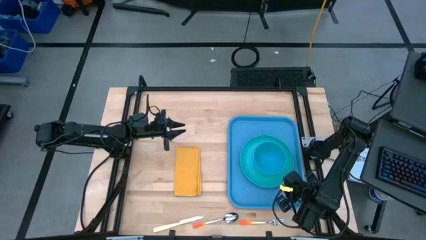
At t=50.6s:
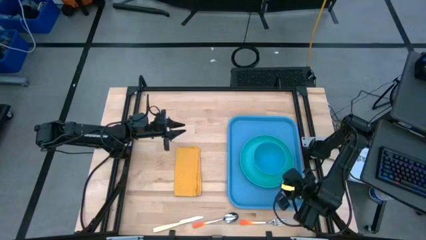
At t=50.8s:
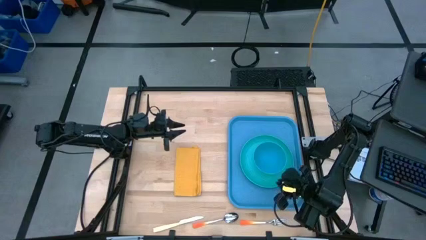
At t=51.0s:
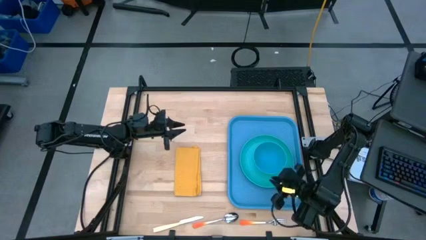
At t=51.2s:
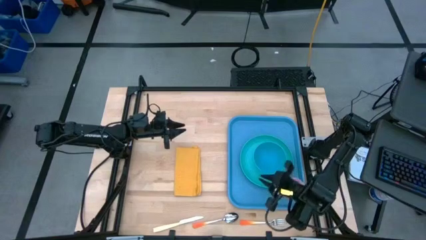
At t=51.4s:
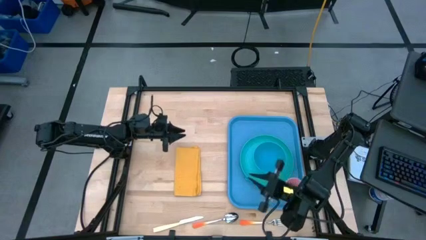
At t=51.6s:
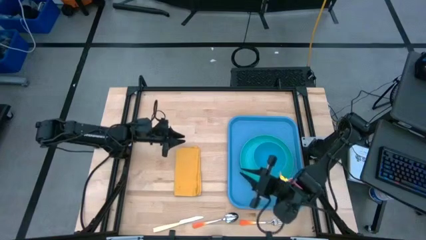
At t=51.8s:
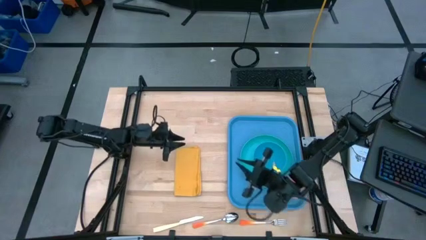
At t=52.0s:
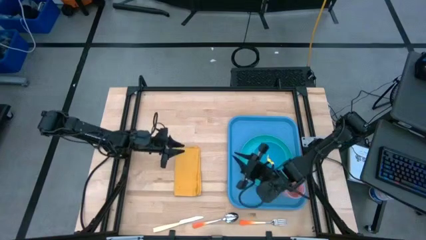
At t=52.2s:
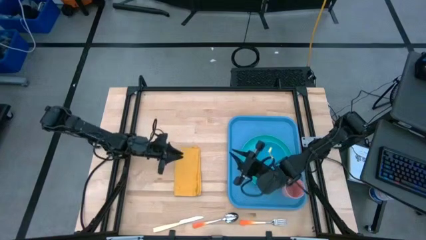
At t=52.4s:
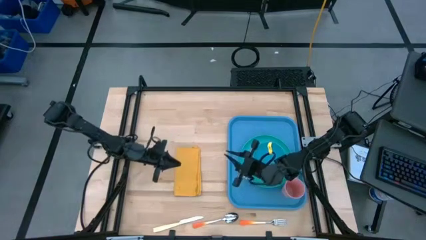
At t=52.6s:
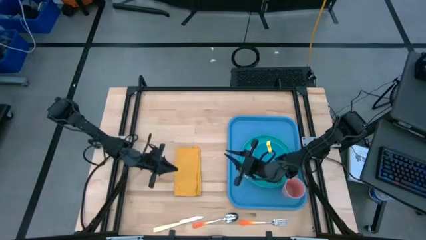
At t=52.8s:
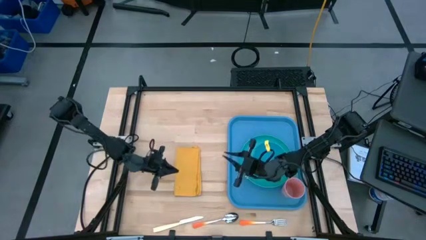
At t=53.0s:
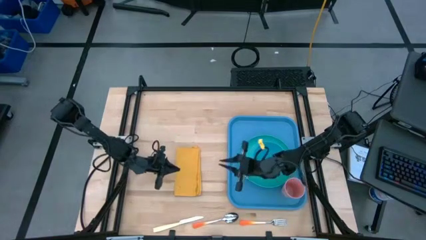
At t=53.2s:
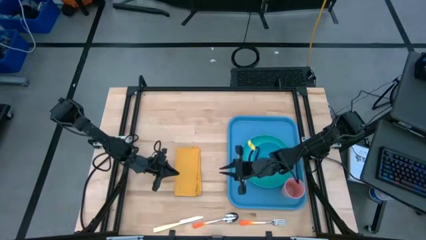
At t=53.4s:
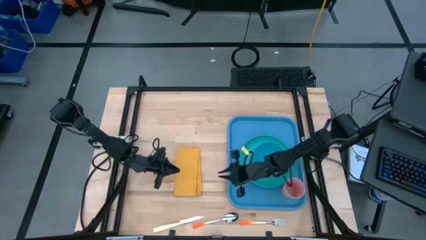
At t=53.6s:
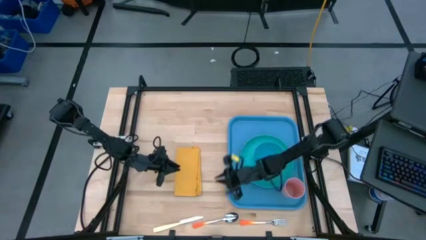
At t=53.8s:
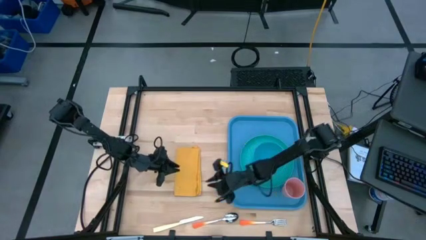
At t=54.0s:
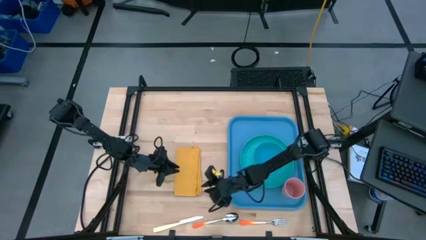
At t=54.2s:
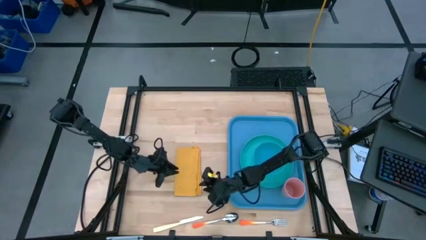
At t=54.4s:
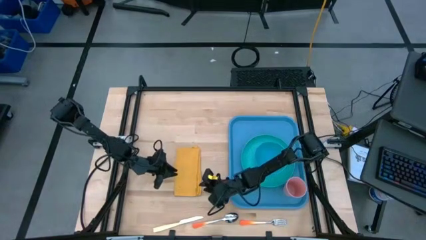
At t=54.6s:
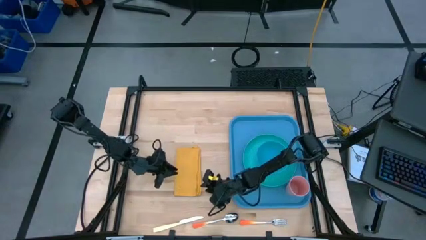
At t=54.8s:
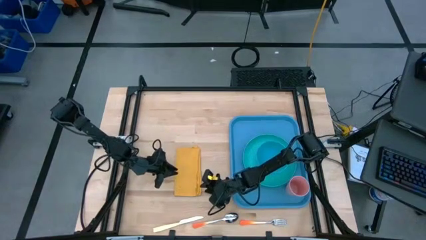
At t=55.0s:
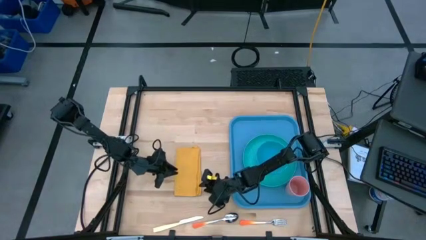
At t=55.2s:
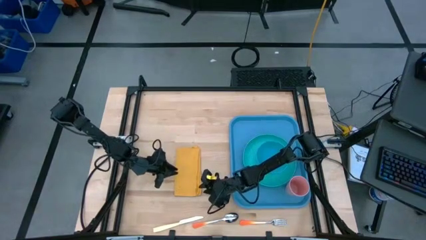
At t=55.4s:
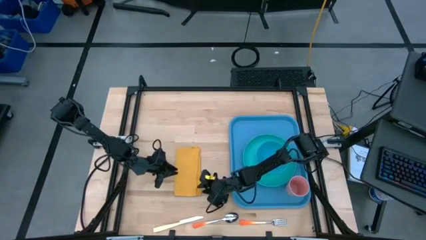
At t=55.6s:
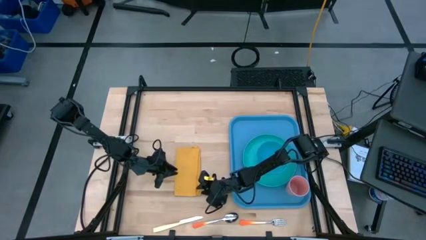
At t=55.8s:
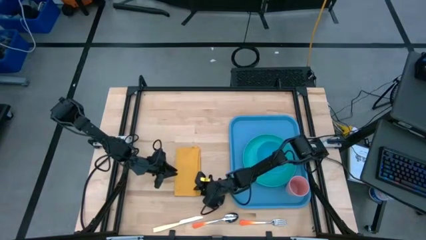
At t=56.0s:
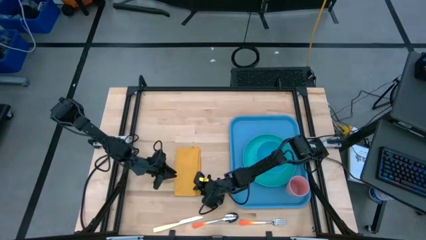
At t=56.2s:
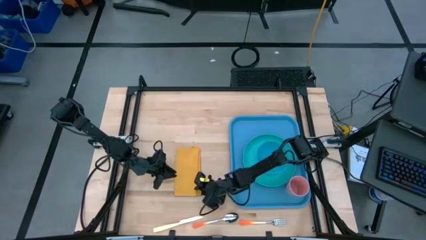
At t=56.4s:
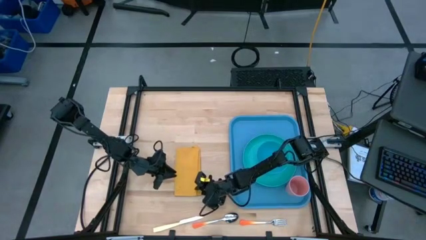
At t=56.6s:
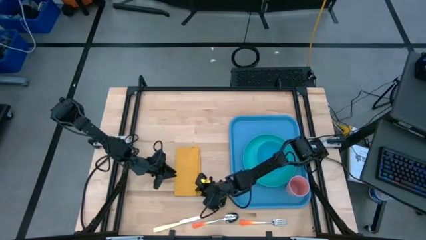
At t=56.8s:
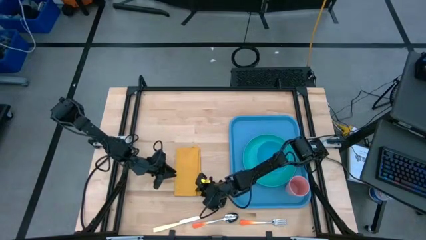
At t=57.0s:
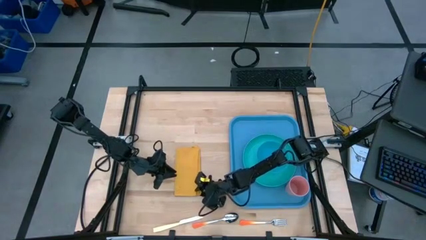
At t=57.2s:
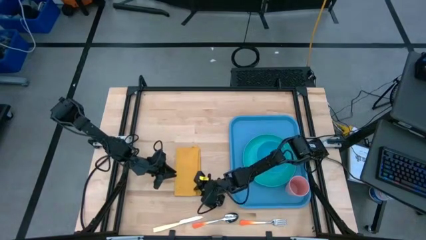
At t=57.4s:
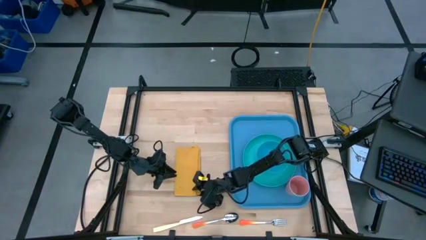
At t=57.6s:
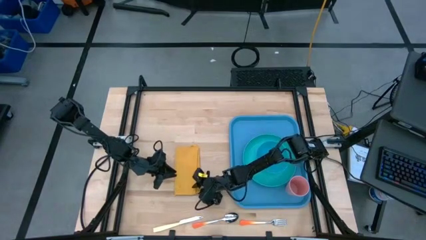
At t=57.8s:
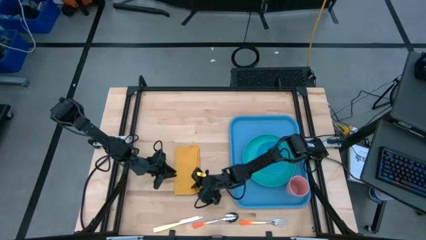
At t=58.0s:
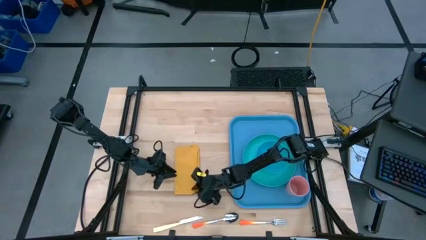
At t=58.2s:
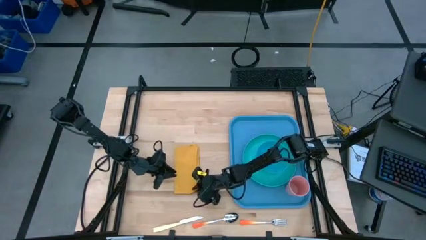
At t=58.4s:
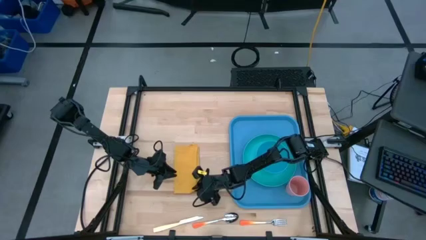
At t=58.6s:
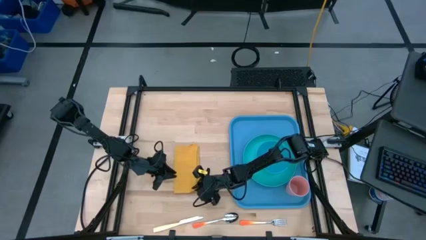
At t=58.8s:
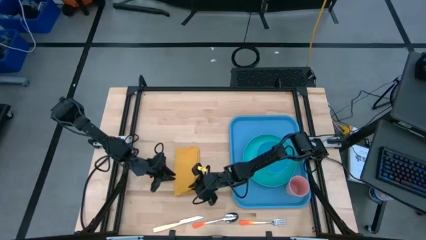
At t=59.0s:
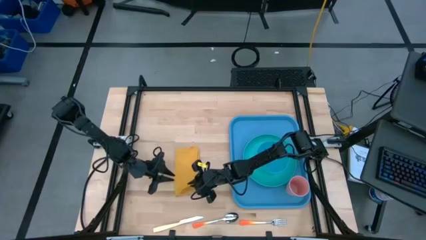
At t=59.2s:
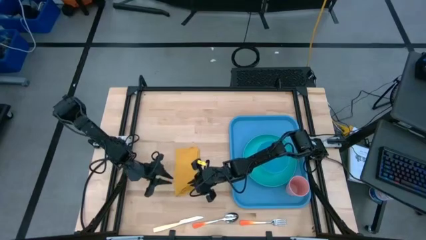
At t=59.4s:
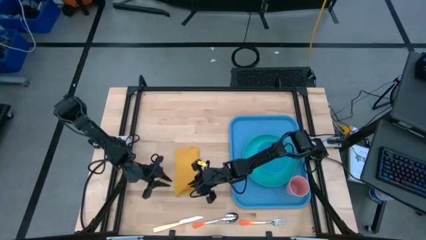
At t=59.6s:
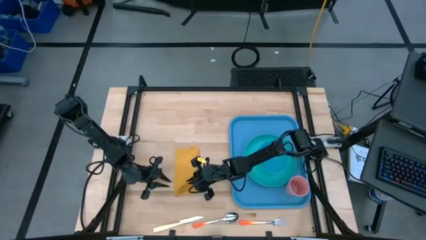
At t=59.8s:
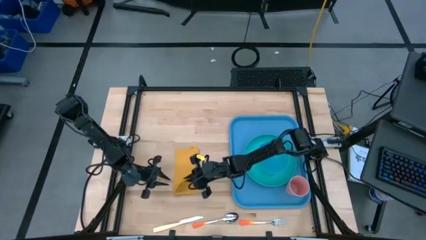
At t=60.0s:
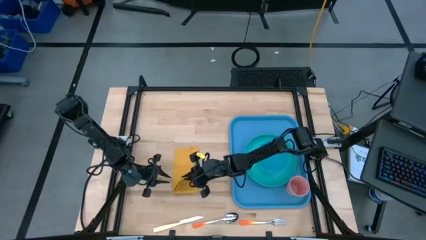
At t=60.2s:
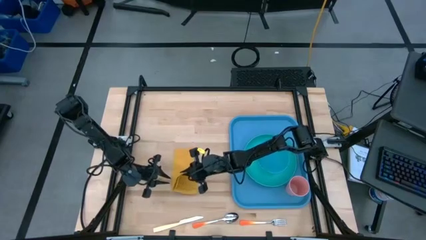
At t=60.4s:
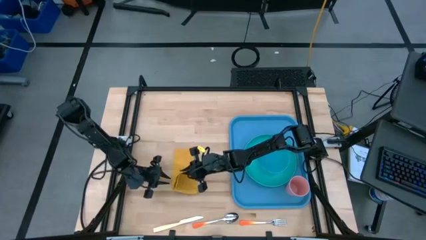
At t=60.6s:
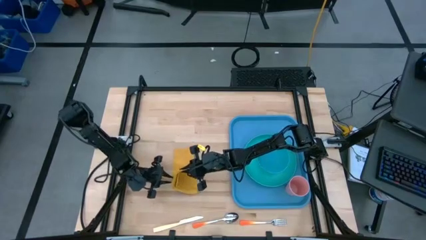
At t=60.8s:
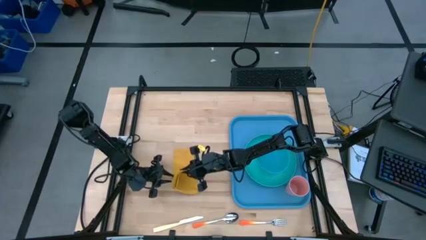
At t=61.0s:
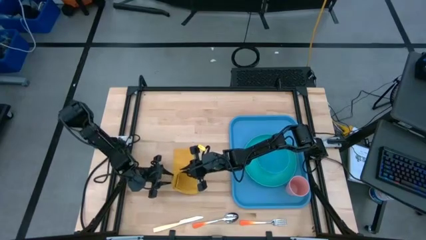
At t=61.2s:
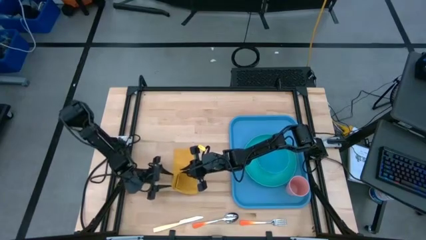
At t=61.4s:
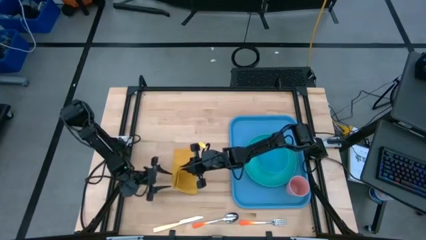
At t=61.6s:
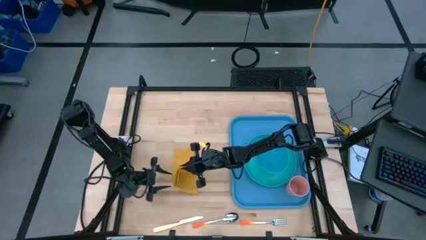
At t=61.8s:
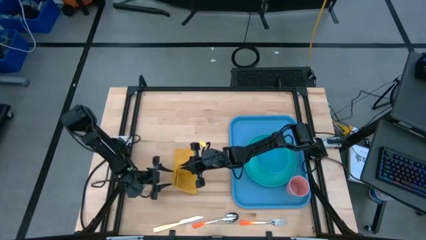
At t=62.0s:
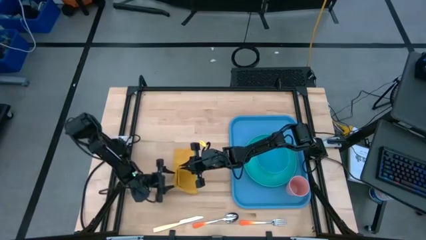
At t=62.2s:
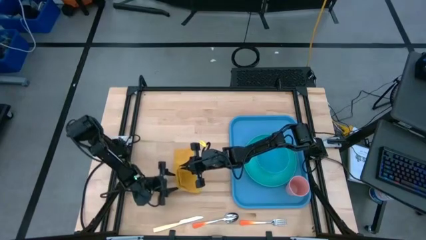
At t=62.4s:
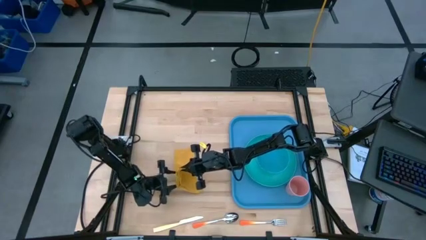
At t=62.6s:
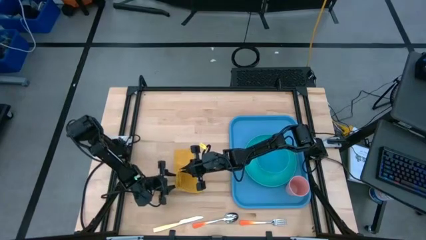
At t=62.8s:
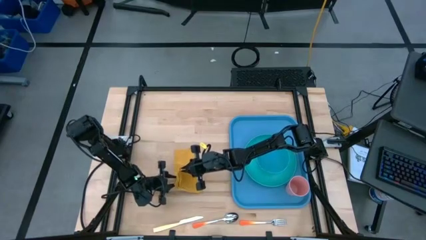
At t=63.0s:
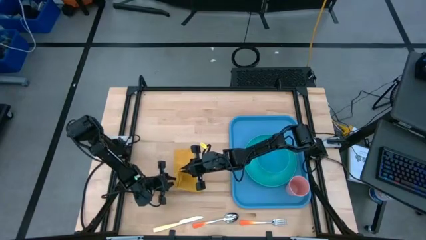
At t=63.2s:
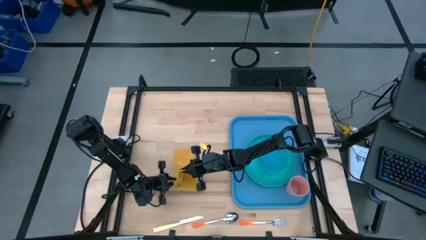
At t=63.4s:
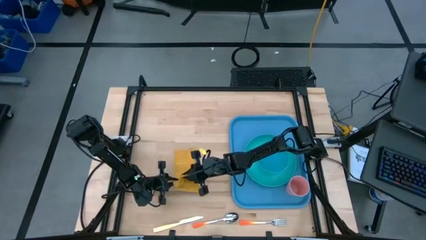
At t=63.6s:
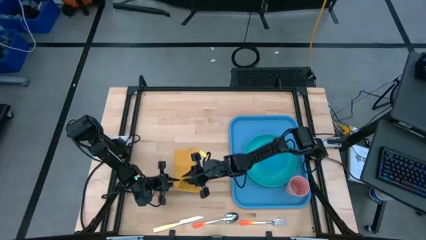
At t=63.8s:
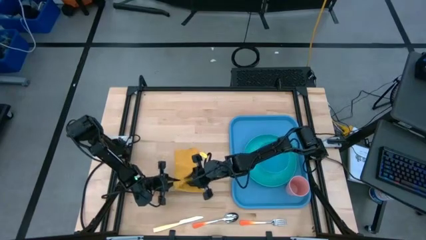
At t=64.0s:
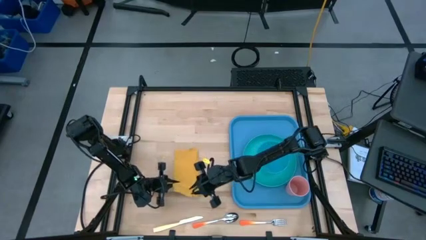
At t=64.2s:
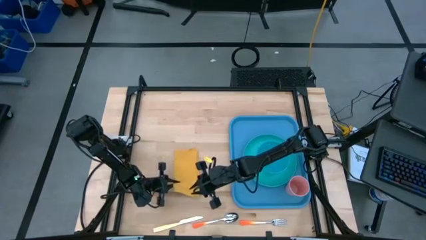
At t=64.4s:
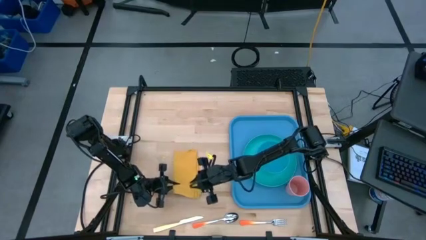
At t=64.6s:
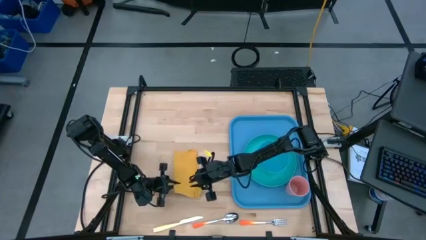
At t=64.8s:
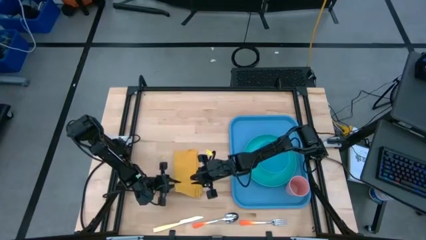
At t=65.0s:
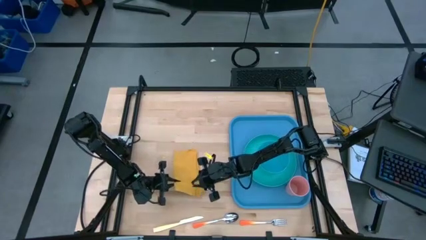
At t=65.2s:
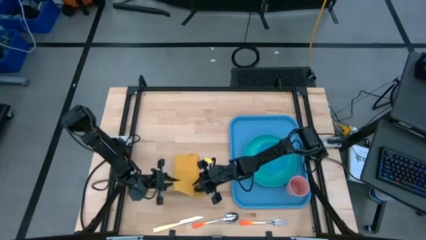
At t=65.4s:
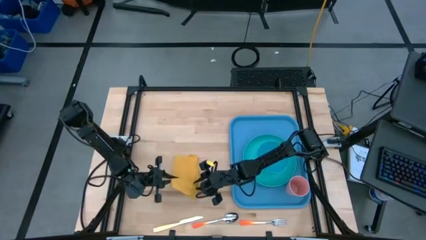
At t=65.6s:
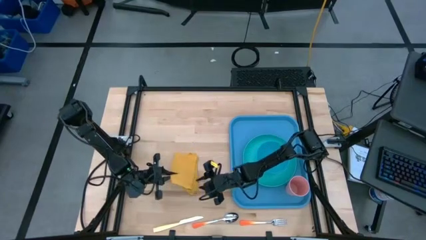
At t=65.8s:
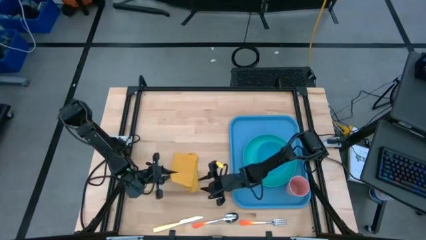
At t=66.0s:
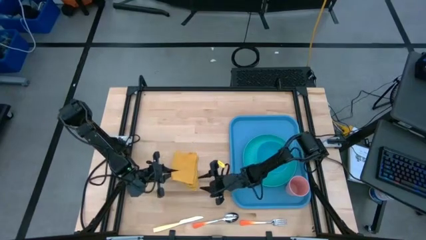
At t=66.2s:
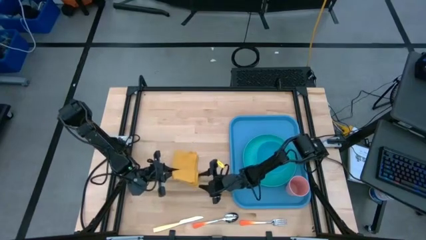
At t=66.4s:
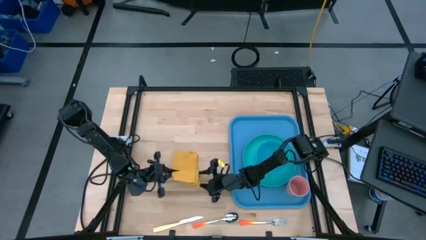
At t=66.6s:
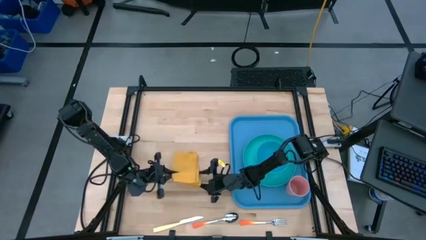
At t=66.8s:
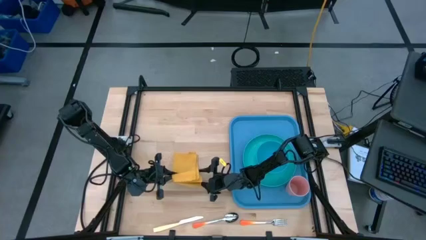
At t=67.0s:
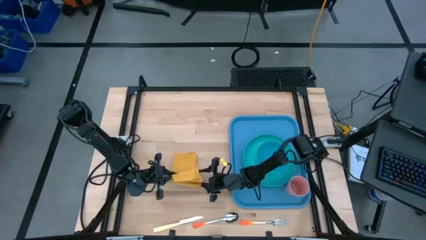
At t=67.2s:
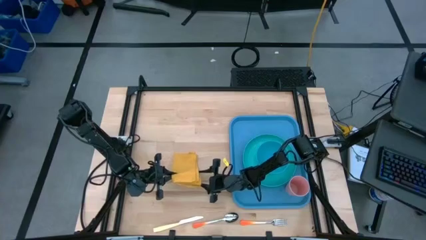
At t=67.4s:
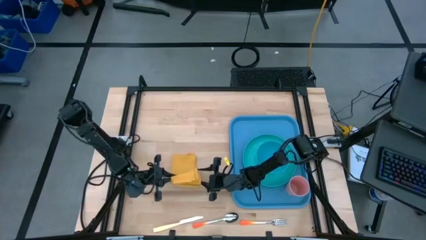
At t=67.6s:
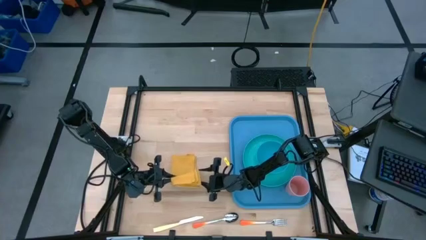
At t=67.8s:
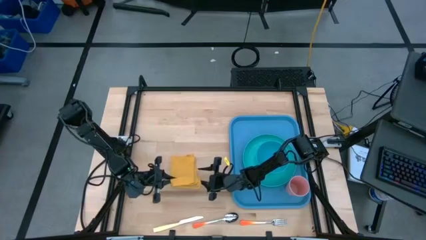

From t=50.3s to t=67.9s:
Task: Set up tray
Put the yellow napkin on the tray to the left of the blue plate
